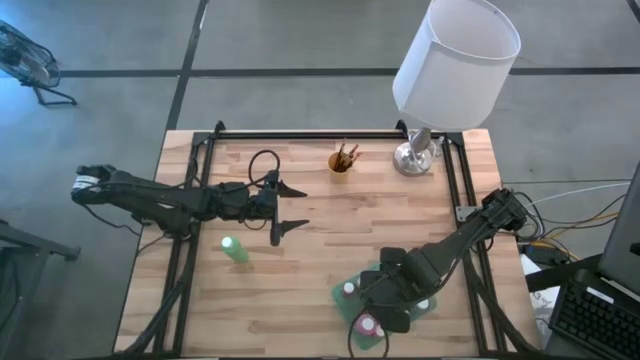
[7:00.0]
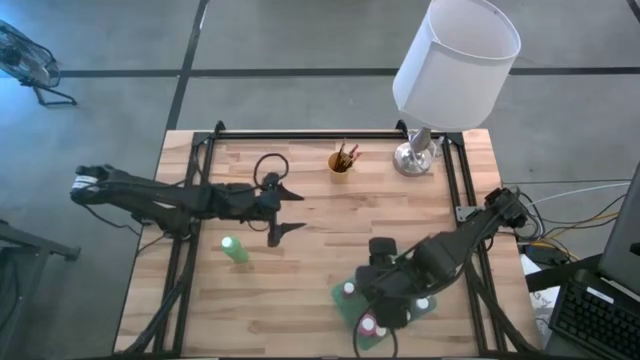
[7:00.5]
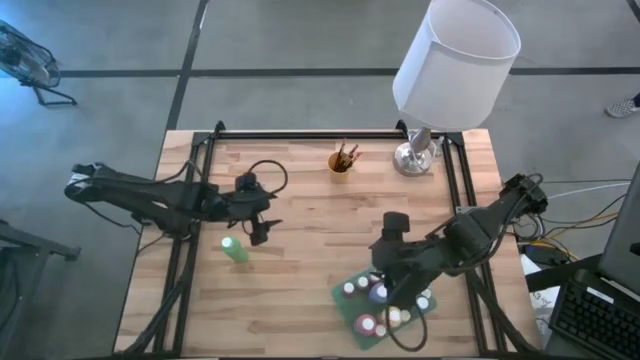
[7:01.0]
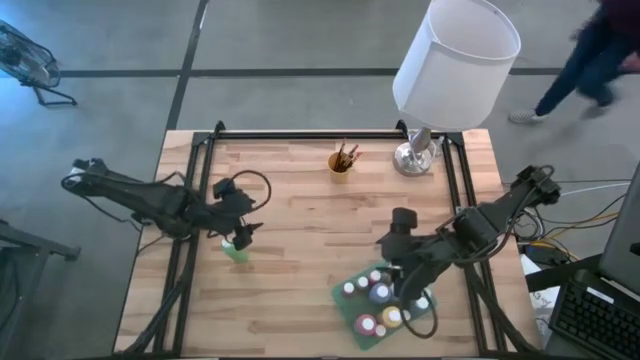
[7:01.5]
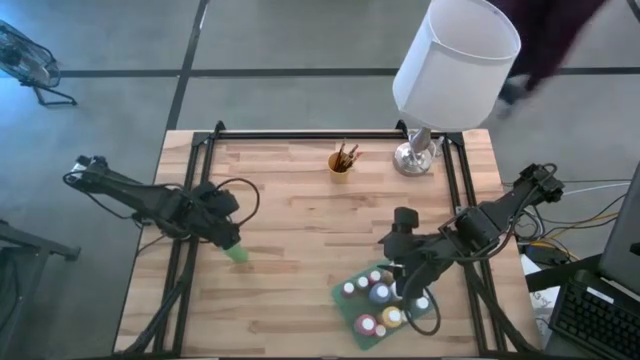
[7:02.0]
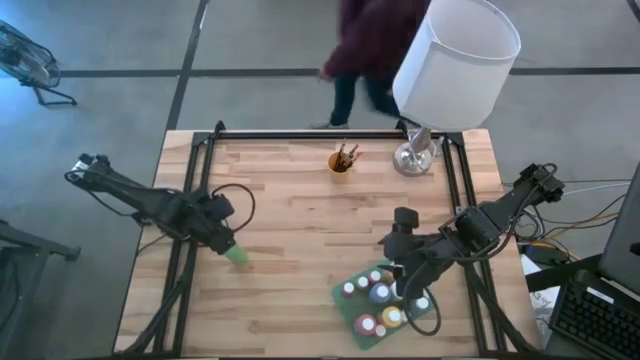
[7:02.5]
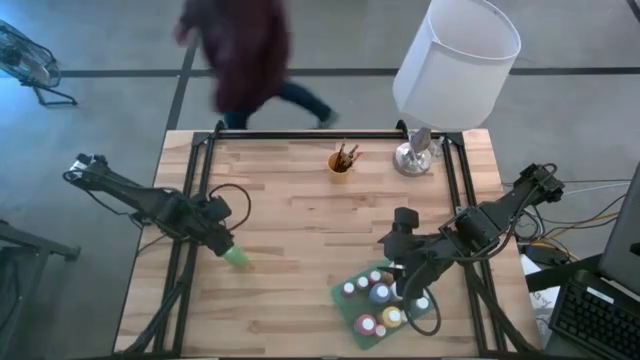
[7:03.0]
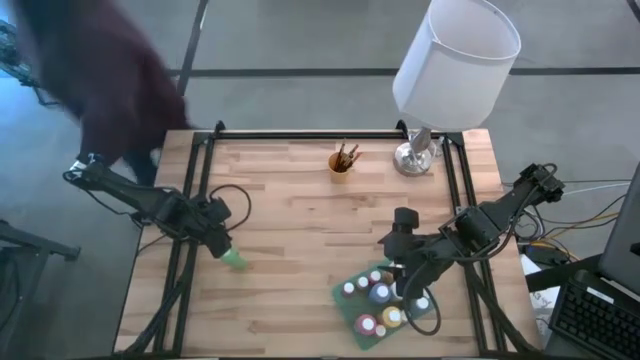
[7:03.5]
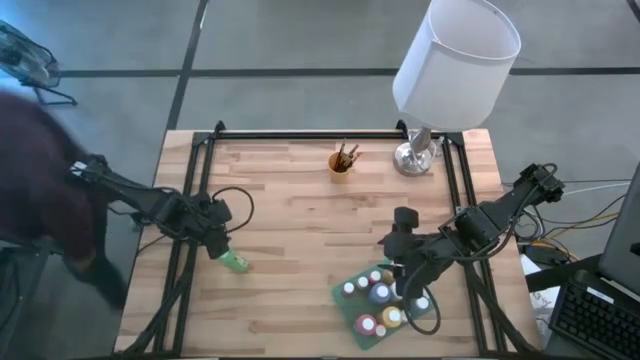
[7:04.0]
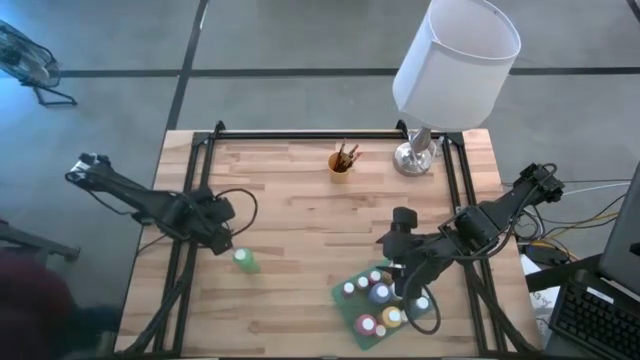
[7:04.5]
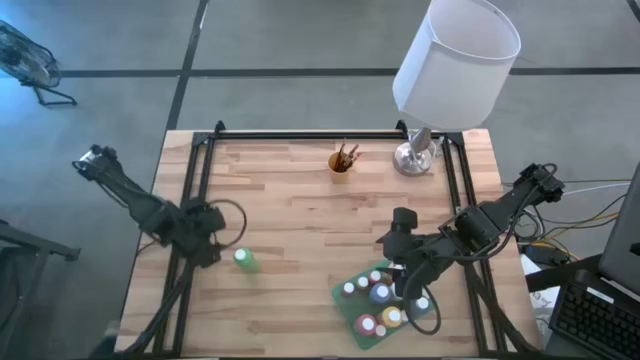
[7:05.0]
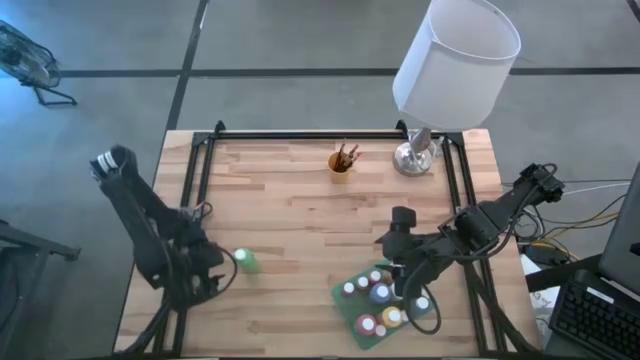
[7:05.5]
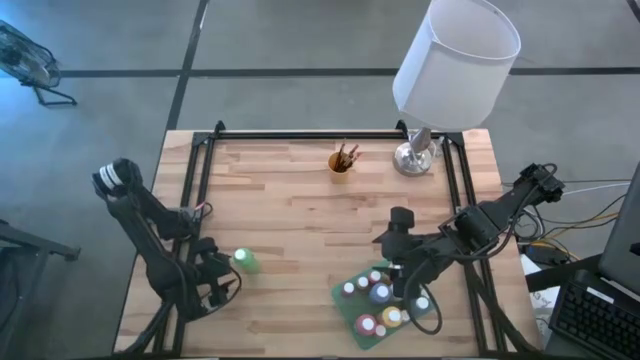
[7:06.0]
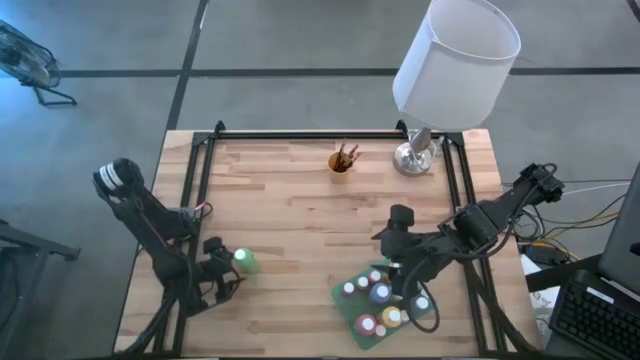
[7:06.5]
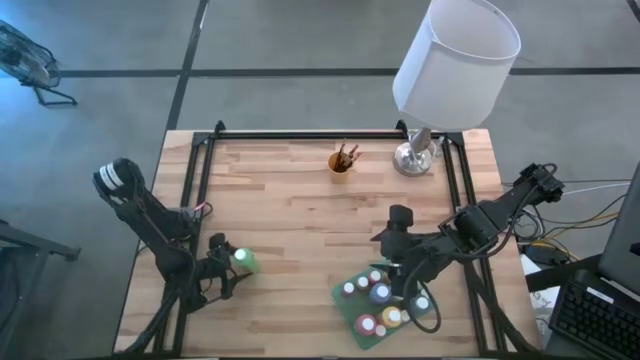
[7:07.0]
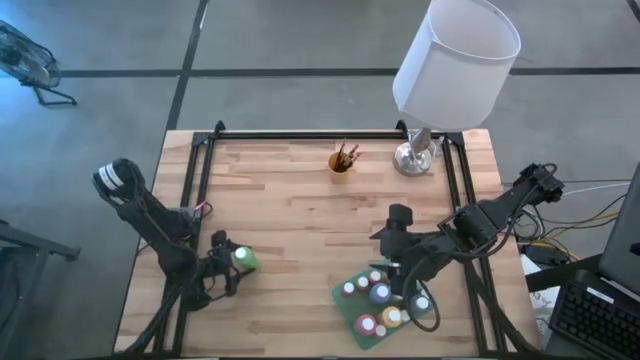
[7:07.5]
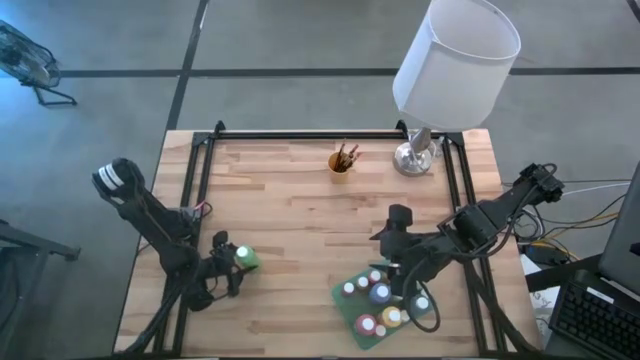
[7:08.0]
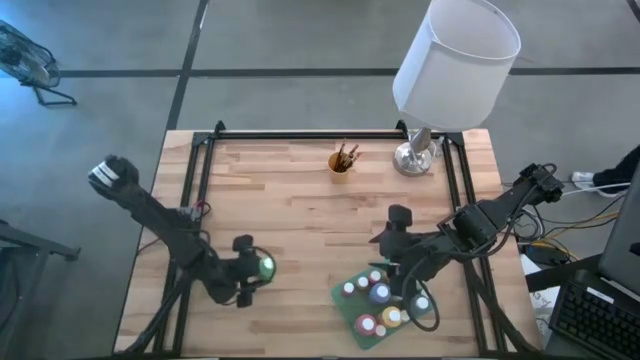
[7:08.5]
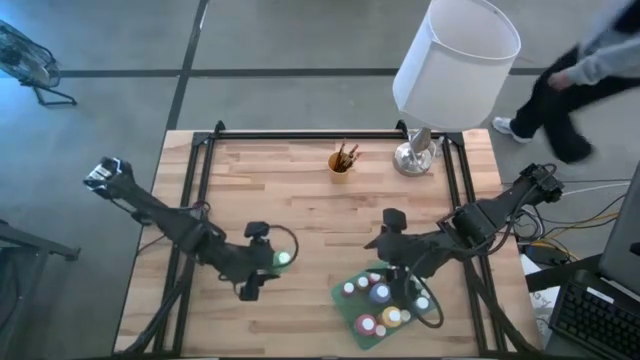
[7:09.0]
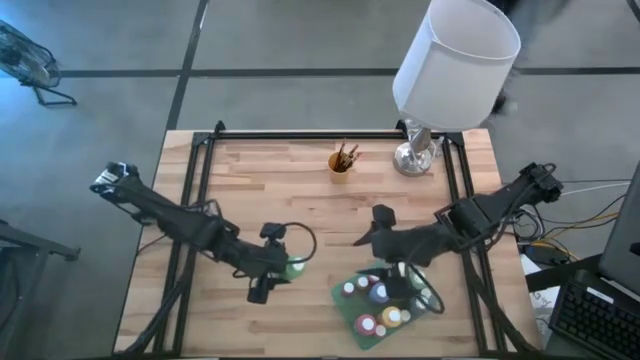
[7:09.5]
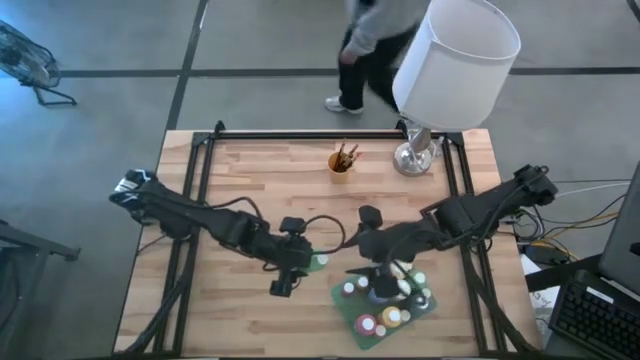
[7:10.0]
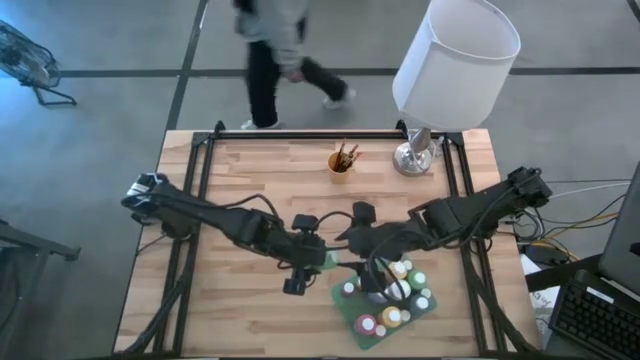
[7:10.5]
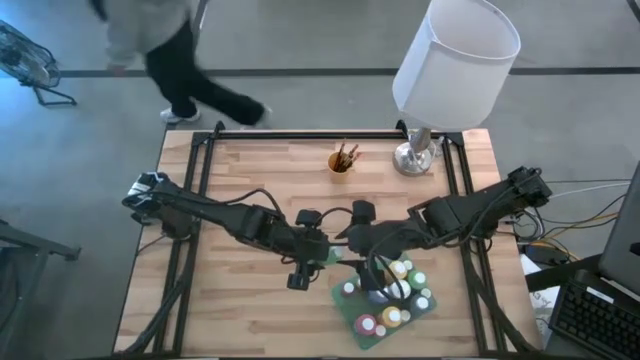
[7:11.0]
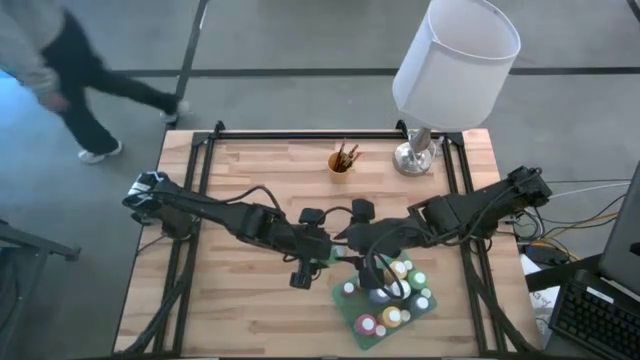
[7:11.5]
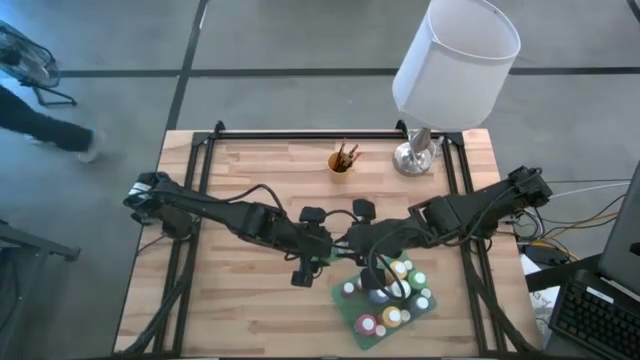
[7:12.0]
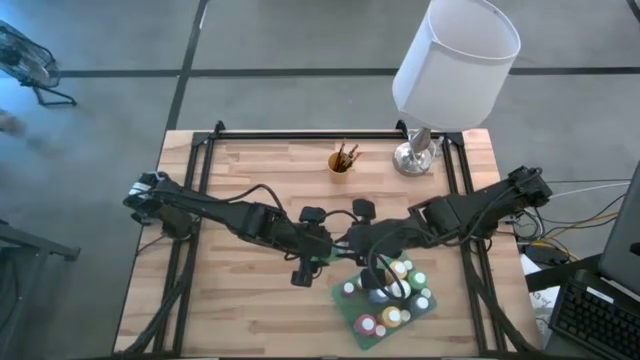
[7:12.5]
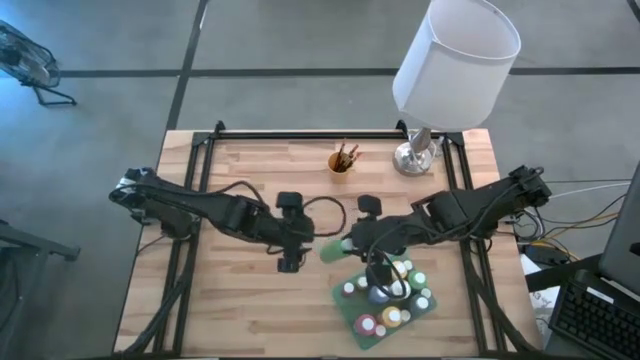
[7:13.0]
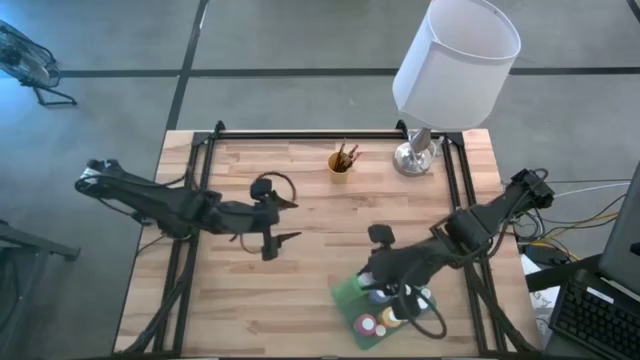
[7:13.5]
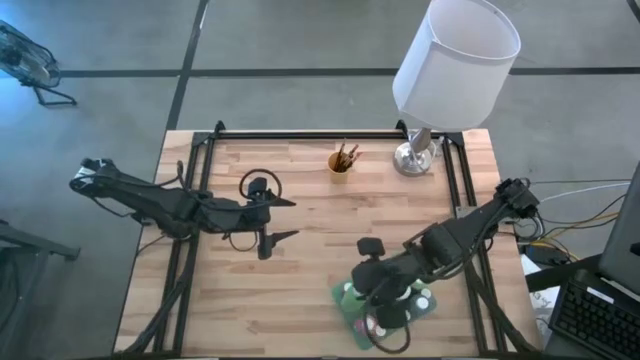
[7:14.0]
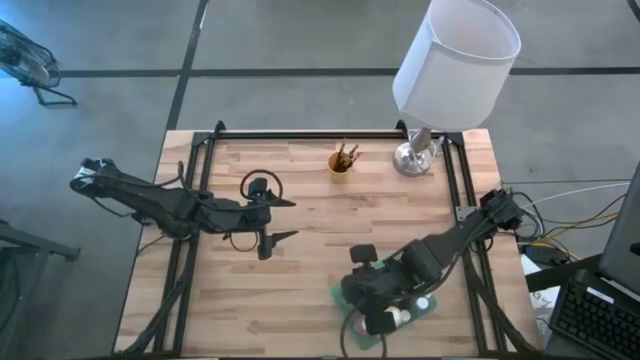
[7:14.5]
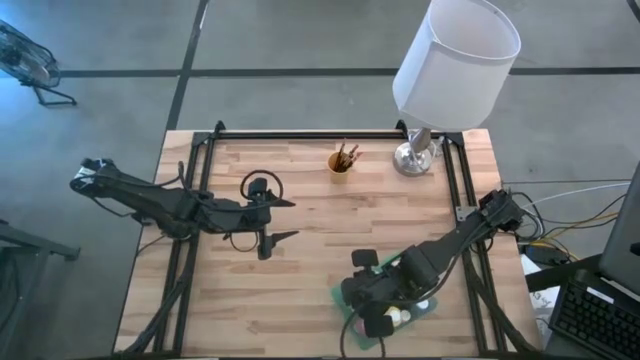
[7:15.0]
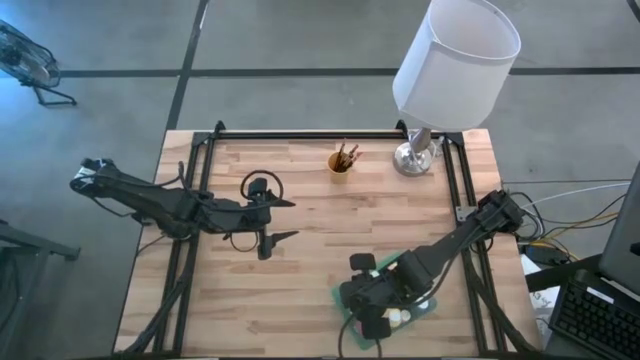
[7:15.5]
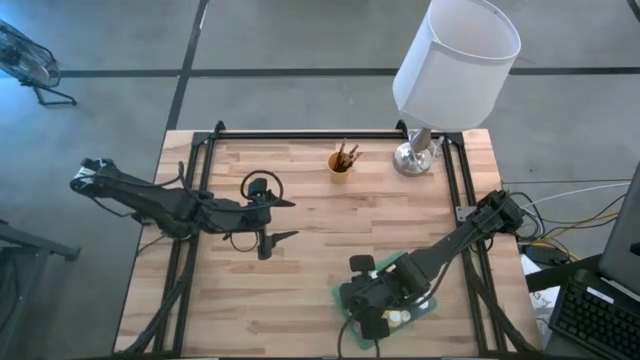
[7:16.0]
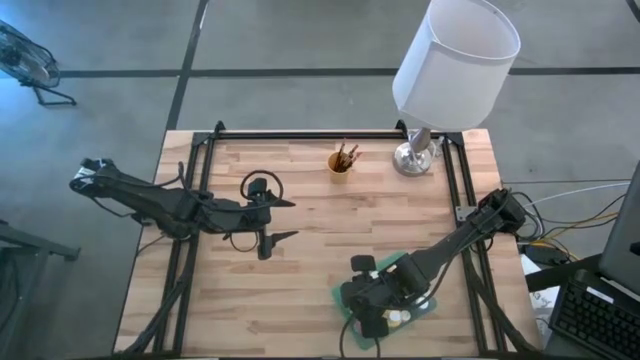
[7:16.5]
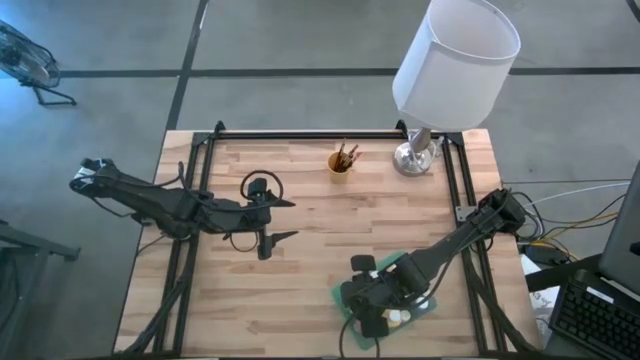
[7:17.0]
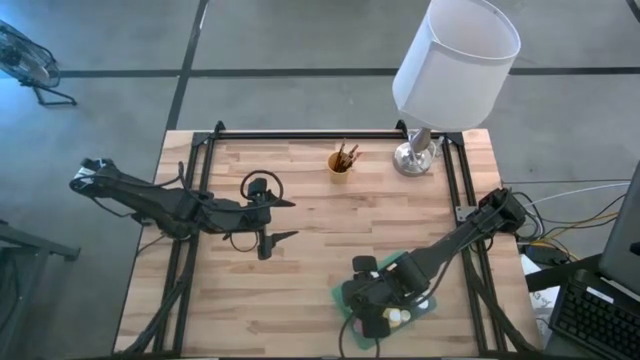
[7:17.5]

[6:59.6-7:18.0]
Task: Pick & Place Paint Supplies
Put the big green paint bottle into the green bin

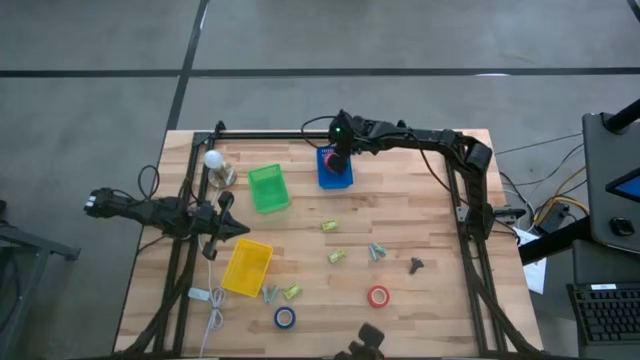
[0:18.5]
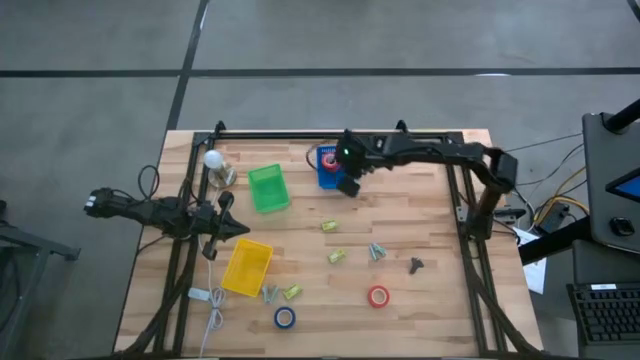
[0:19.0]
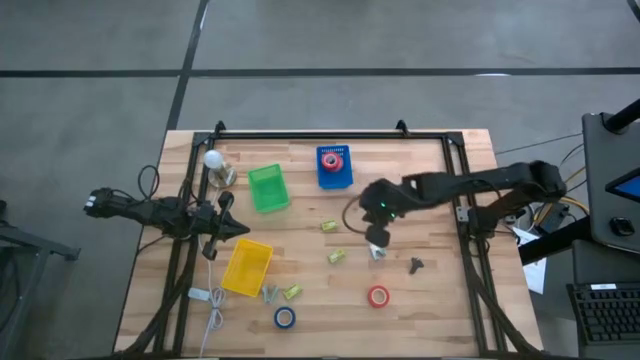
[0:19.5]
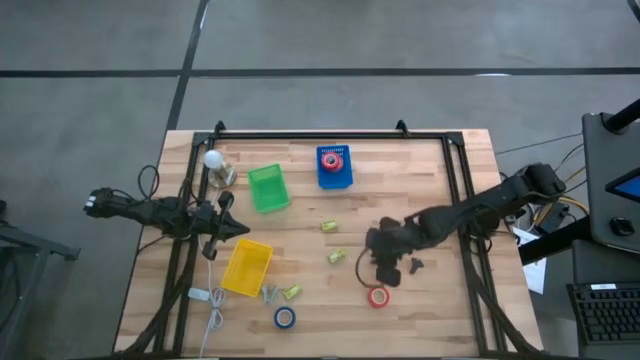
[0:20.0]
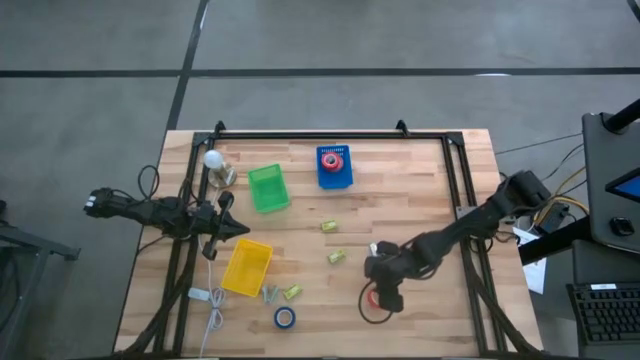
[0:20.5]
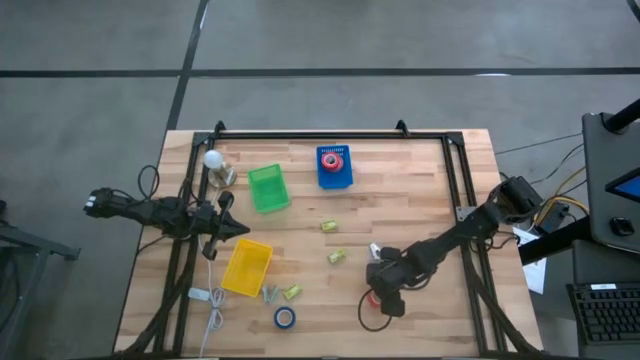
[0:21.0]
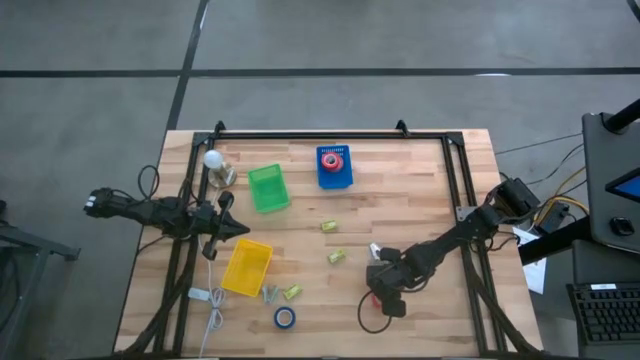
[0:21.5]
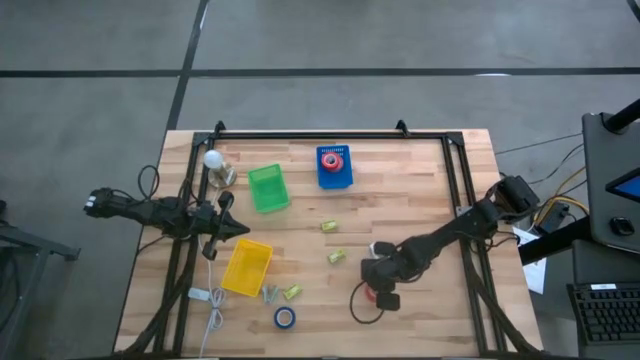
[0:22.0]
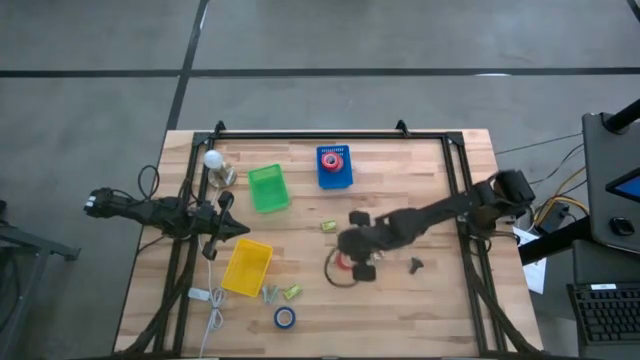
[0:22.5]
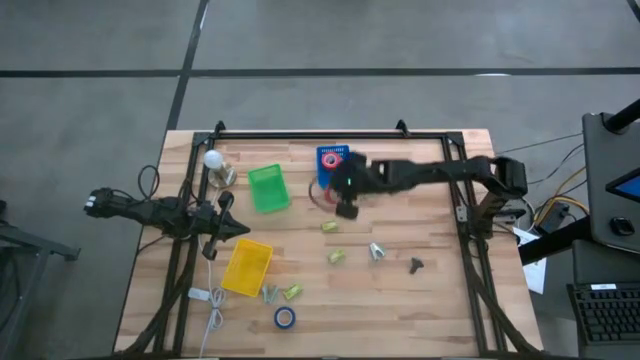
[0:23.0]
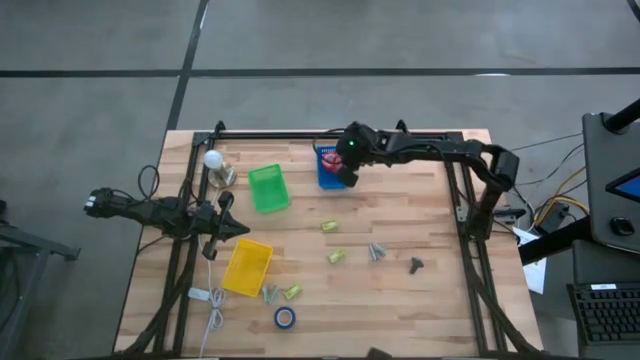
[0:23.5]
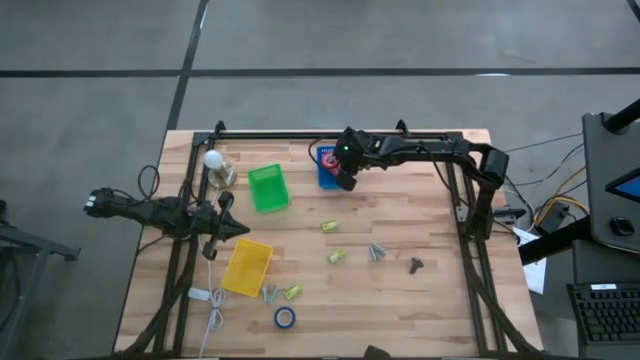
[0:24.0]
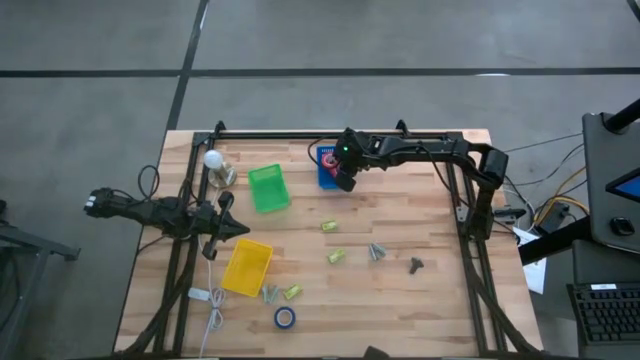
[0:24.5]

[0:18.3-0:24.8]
Task: Pick and place Stapler, Stapler remover, tape
Put the red tape into the blue bin
